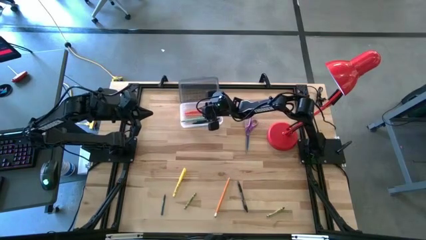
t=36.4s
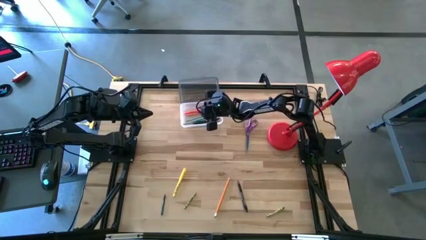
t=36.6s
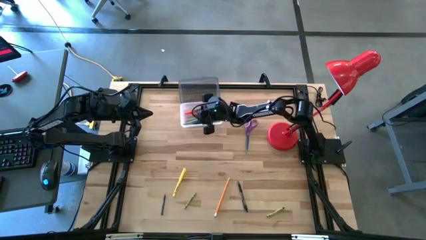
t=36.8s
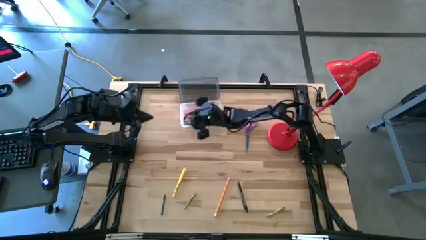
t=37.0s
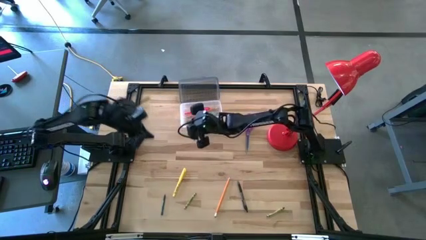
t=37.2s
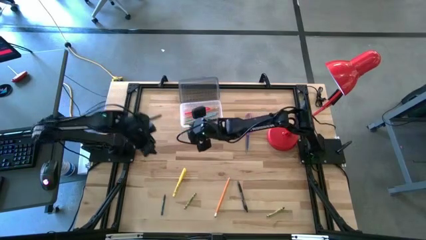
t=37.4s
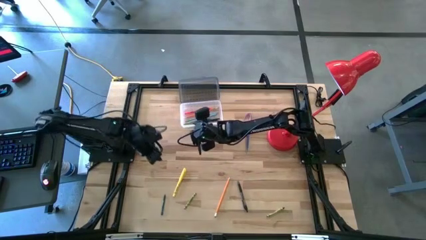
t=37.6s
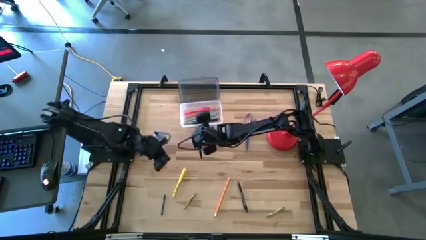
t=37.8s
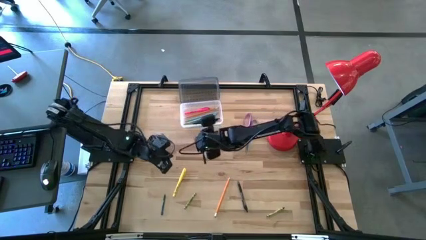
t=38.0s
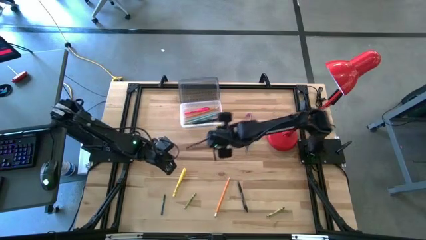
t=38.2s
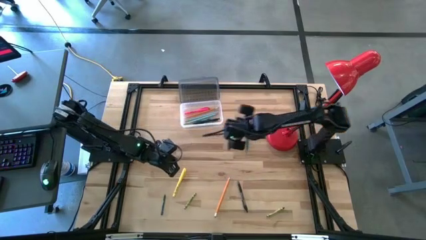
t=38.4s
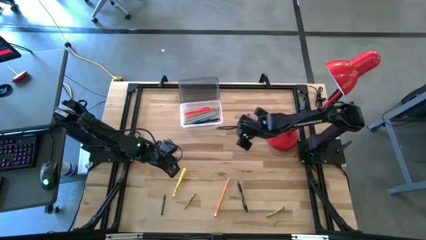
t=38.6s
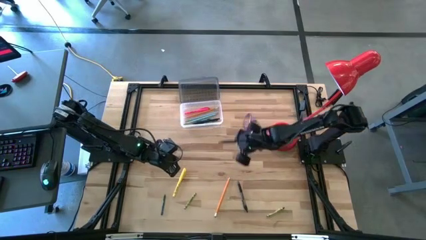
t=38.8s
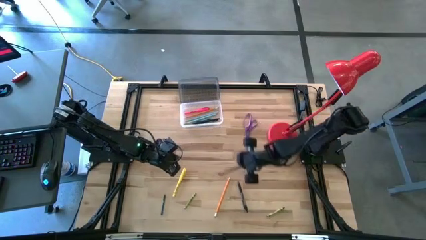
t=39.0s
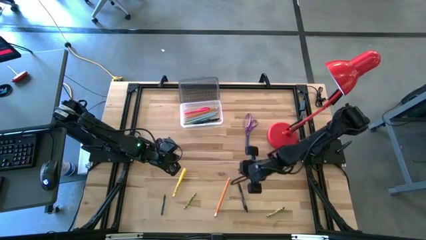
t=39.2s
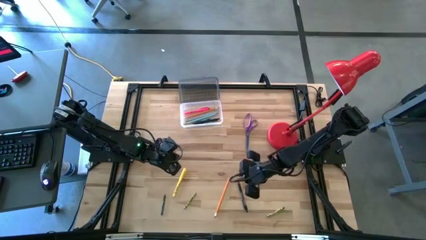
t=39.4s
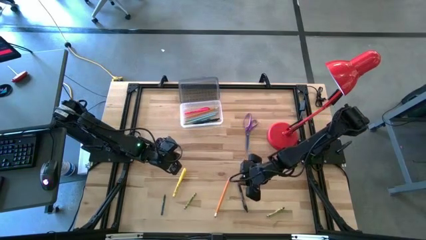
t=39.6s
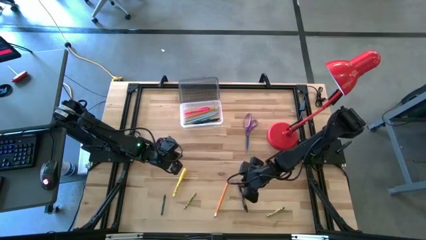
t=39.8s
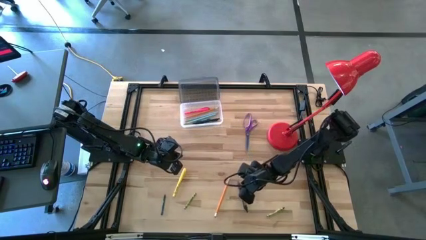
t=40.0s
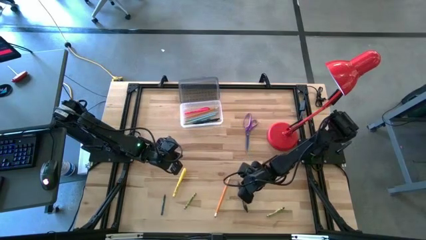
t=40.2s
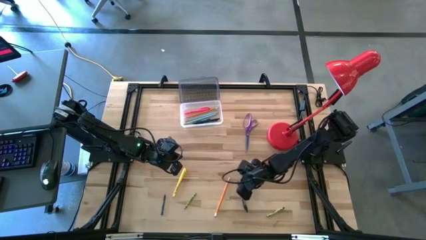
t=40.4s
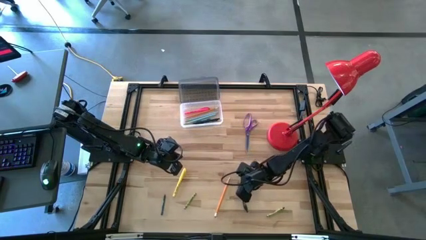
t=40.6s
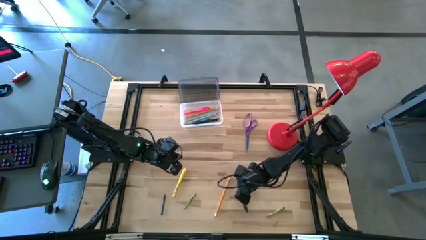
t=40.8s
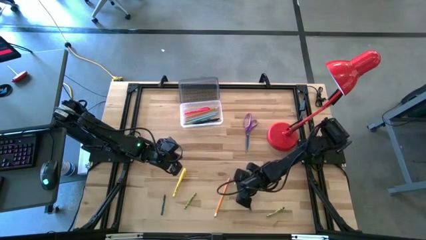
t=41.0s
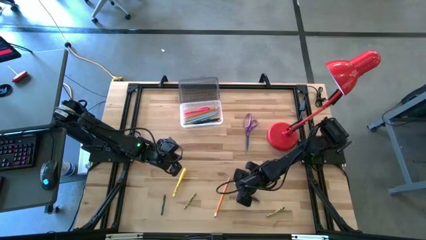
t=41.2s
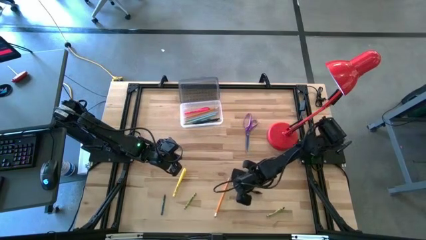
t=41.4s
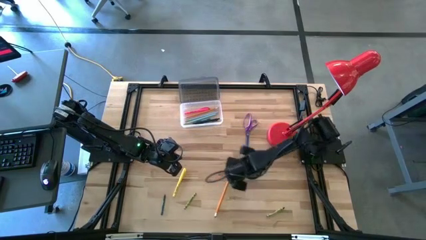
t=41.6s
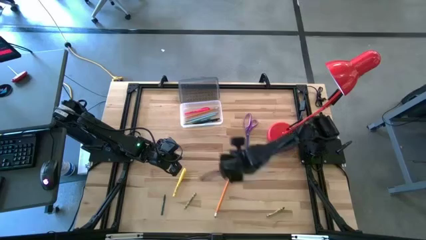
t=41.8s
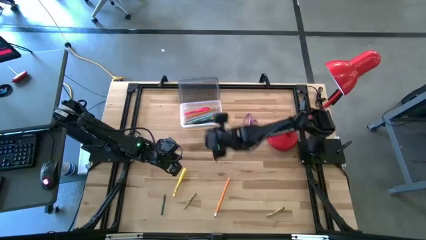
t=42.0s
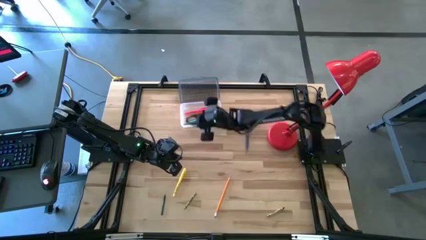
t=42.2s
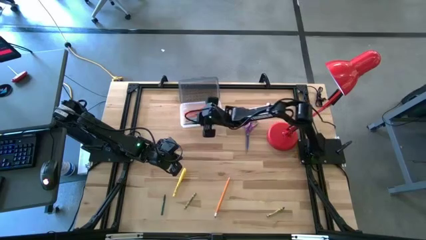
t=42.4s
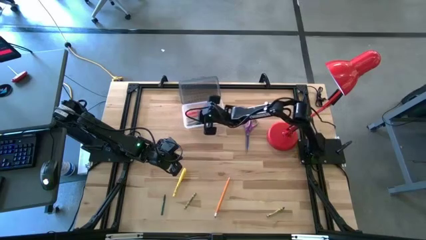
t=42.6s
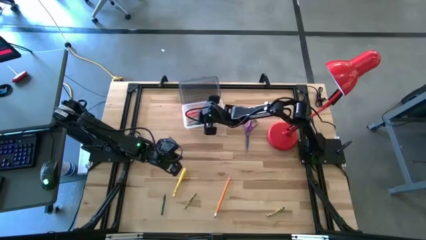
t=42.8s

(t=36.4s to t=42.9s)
Task: Pick & place school supplies into a supply box
Put the black and gray pen into the supplies box

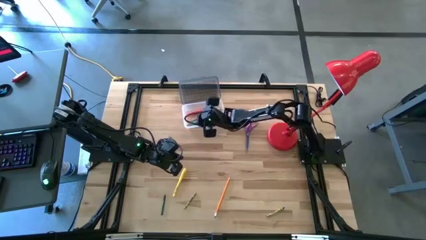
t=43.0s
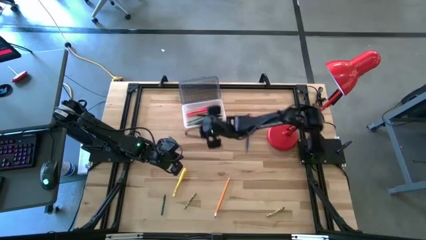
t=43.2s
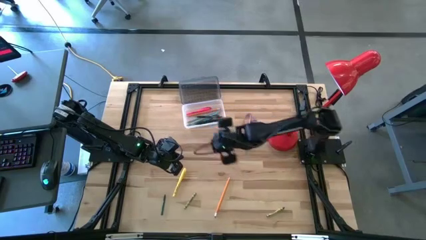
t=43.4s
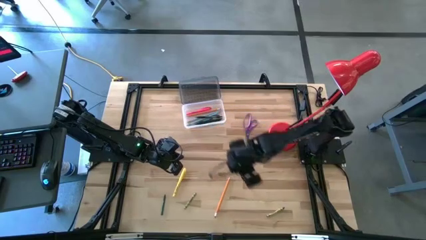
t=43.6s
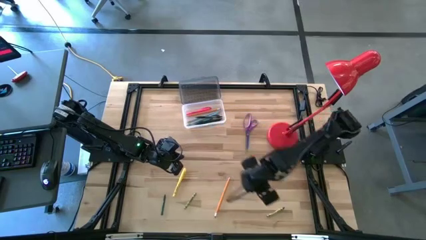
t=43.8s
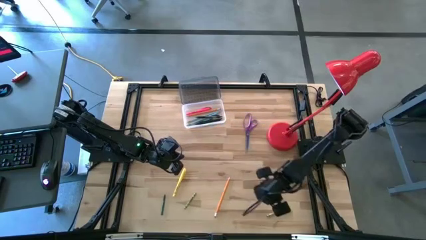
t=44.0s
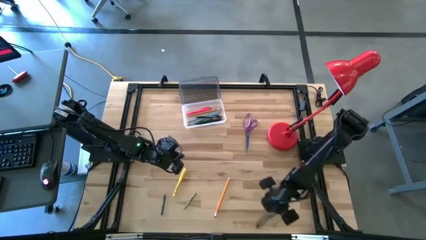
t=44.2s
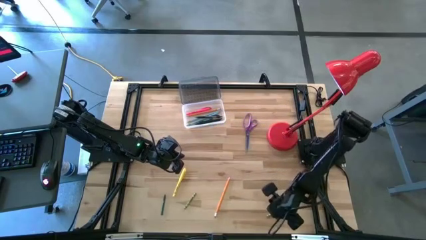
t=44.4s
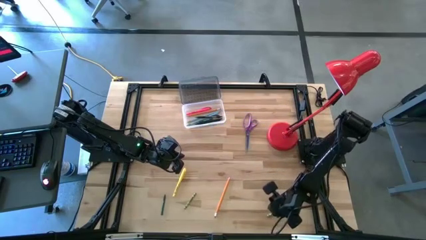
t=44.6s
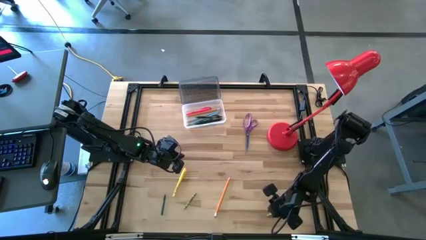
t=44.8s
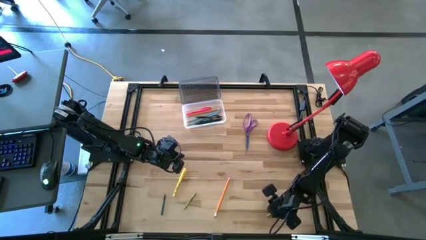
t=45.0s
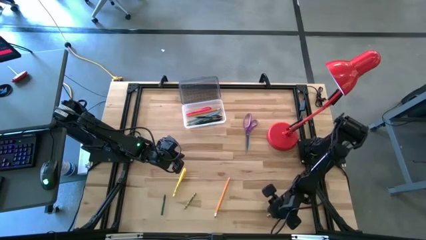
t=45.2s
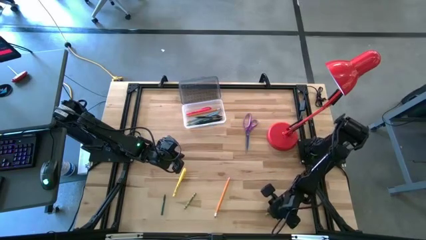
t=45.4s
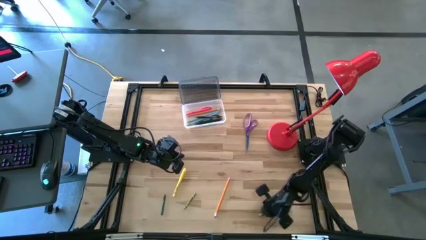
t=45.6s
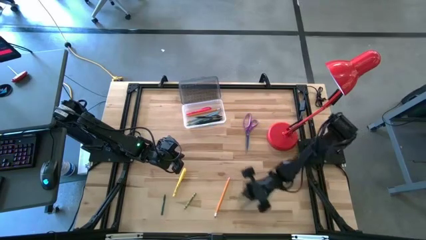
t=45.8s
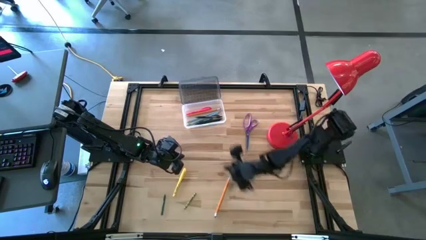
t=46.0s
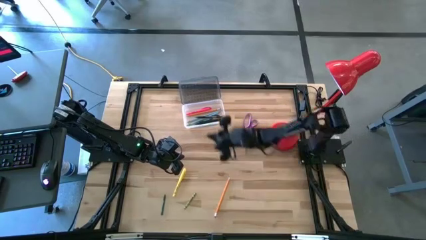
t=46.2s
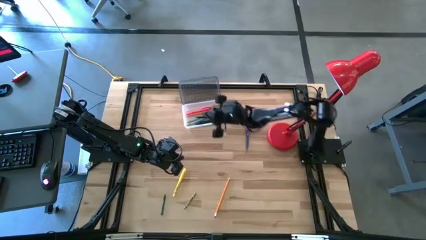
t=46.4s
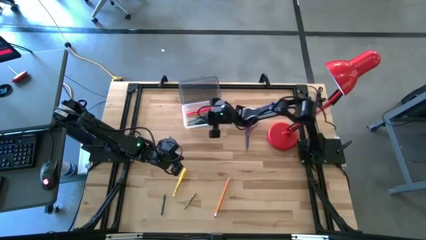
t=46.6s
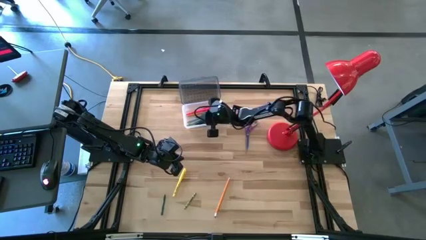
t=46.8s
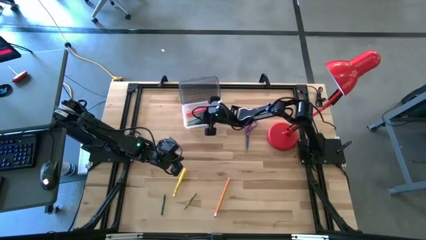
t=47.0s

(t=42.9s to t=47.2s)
Put the green crayon into the supplies box

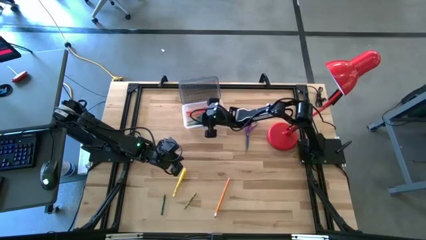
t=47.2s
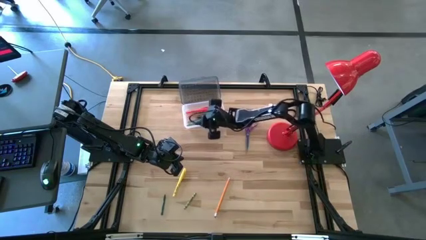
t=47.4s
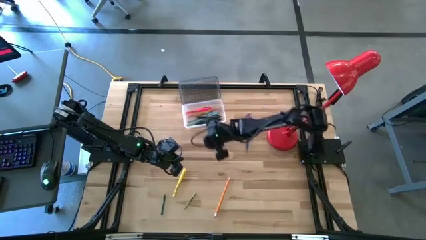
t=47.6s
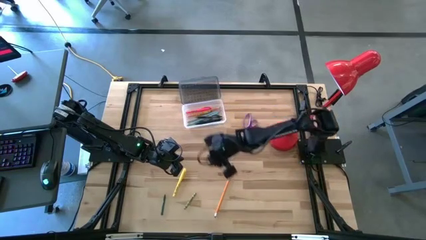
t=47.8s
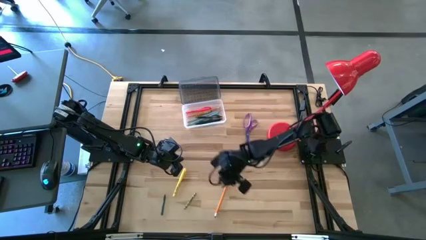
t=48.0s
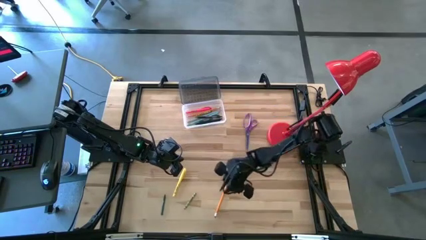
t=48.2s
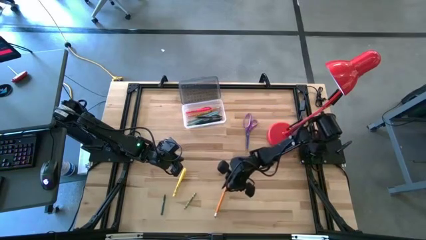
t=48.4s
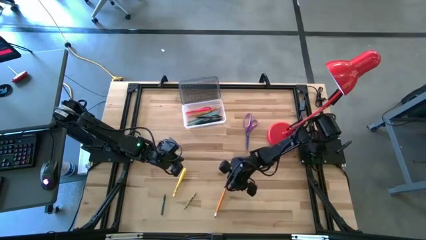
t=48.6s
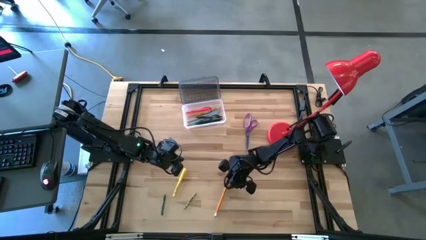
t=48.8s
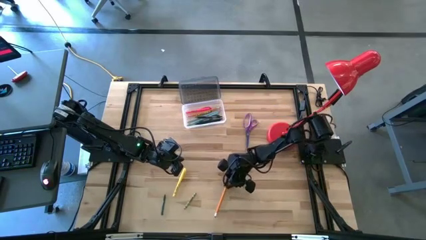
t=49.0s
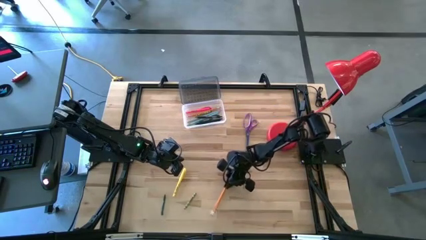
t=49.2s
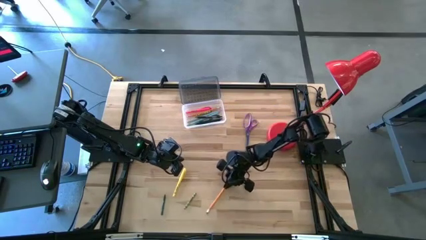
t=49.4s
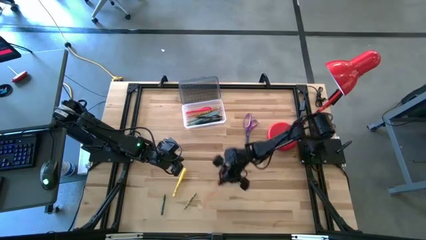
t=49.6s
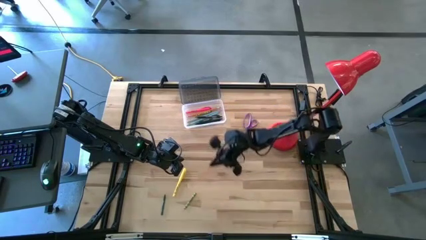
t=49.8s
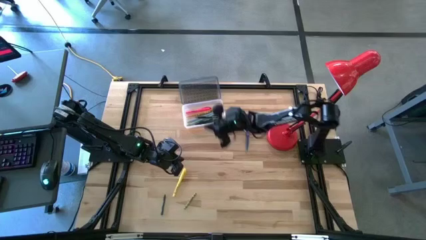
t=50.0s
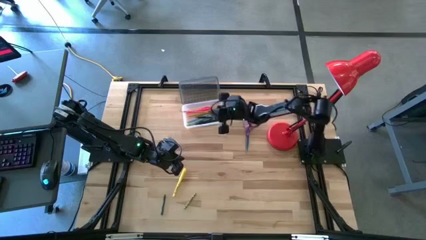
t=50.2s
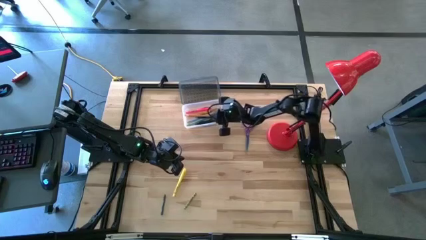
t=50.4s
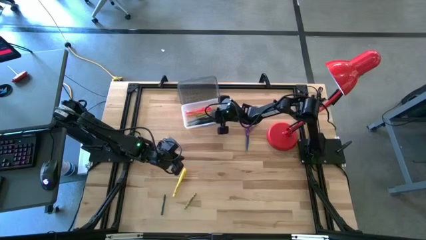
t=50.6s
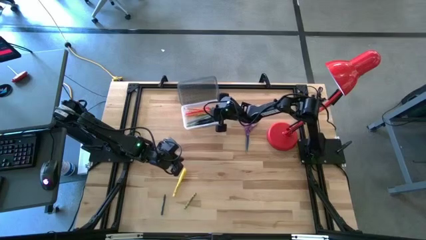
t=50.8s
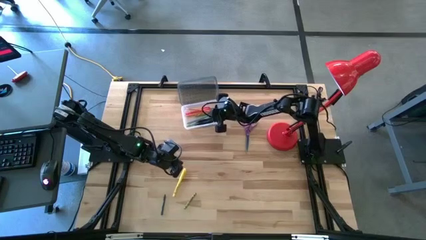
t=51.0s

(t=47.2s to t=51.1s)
Put the yellow pencil into the supplies box

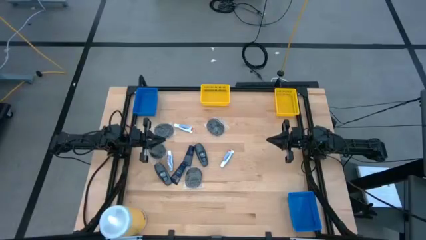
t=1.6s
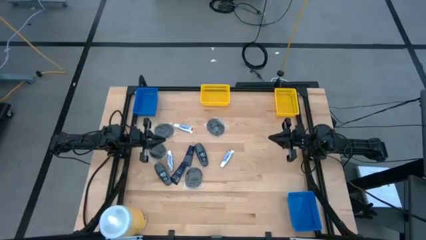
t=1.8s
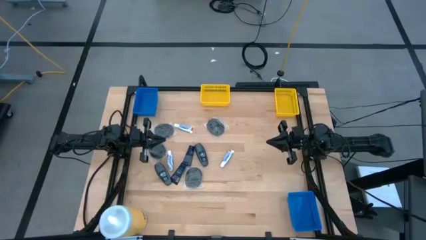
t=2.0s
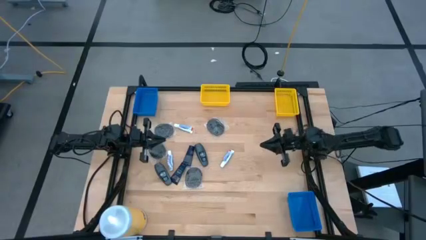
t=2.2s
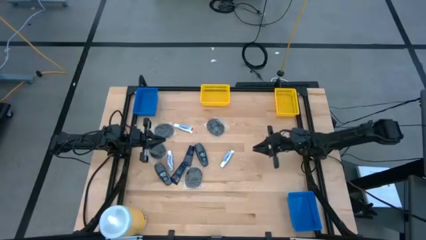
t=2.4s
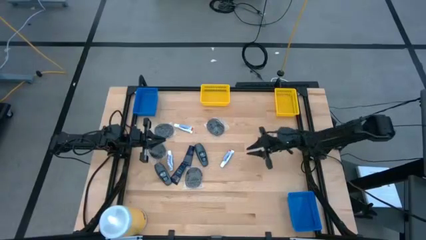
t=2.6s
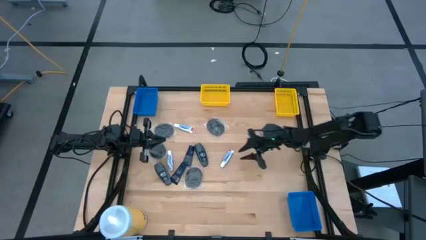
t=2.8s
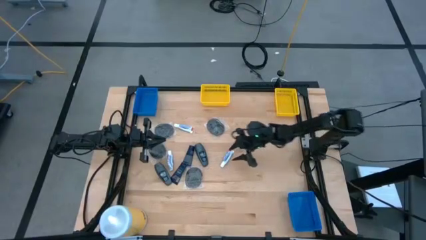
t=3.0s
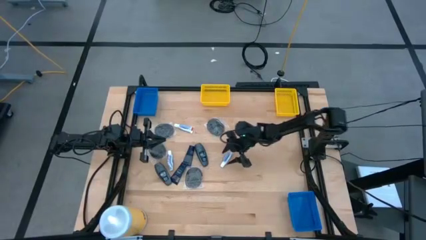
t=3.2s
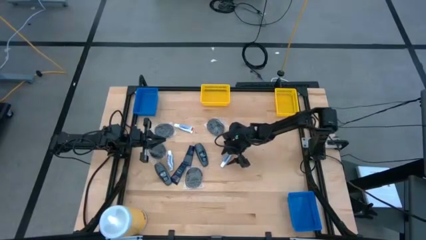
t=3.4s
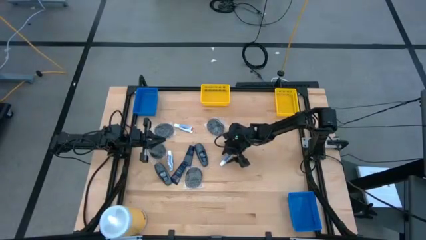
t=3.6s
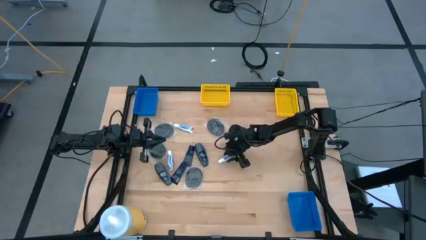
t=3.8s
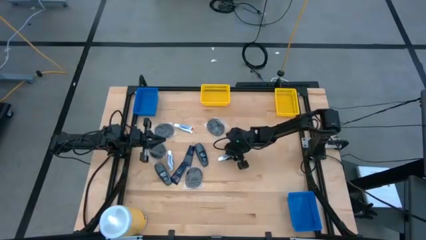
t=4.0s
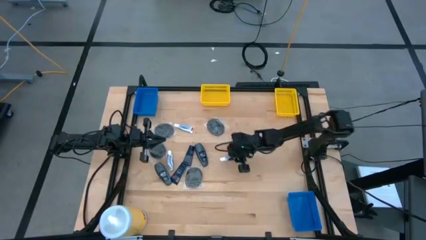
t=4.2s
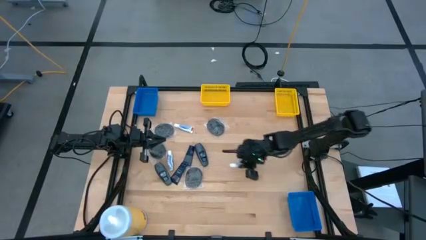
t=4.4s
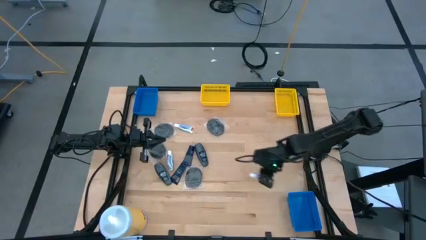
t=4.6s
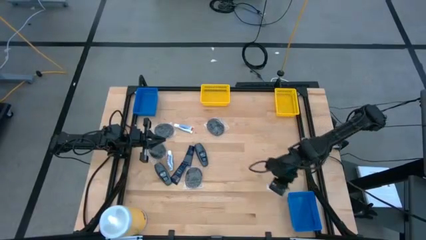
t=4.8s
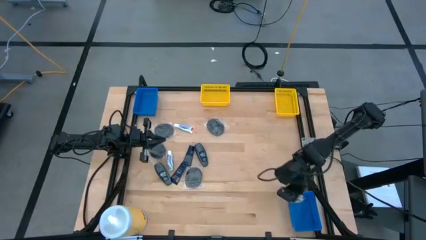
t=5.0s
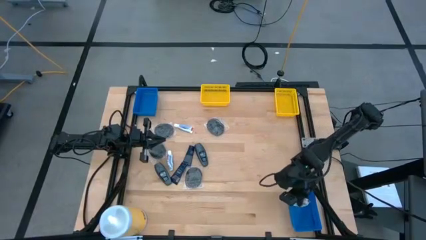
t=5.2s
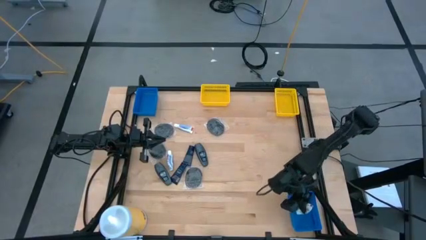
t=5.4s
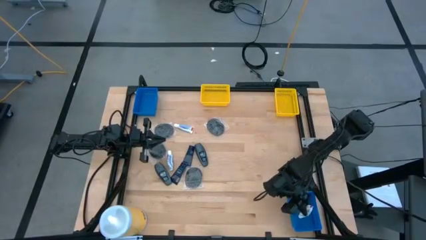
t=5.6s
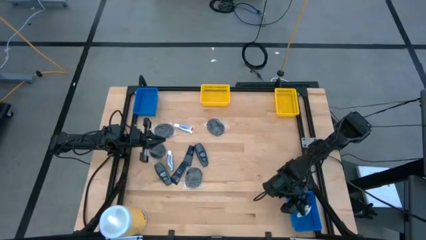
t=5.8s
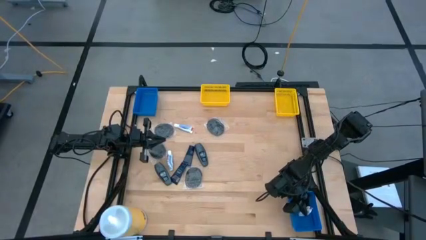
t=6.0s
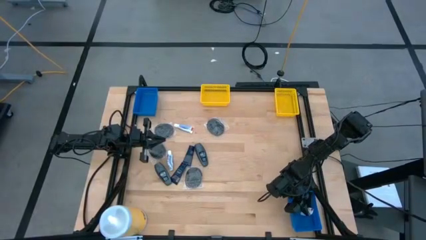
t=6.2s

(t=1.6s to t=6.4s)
Task: Pick & Place Travel size toiletries
Put the right toothpaste into the bottom blue bin
